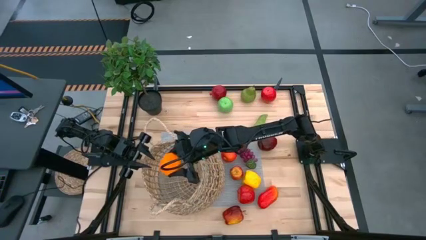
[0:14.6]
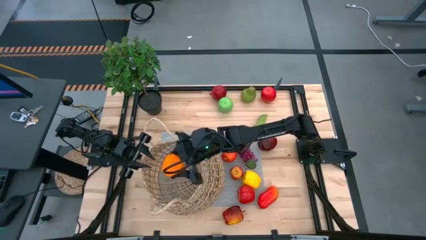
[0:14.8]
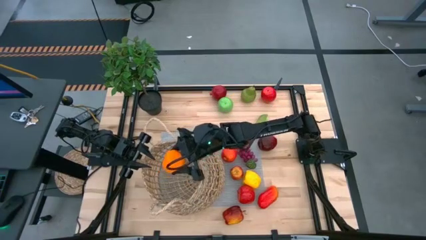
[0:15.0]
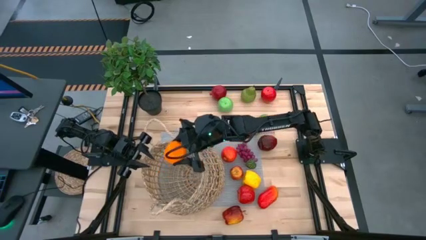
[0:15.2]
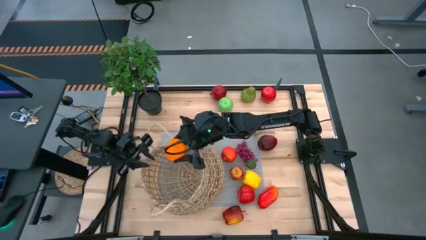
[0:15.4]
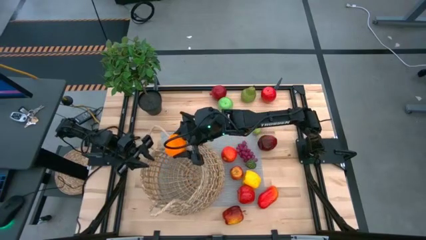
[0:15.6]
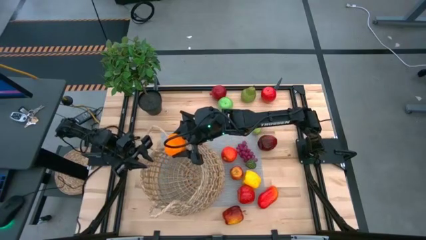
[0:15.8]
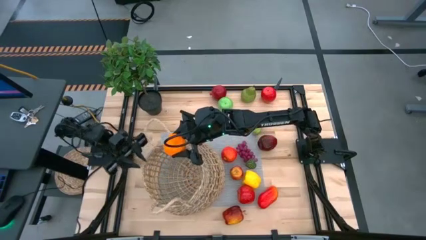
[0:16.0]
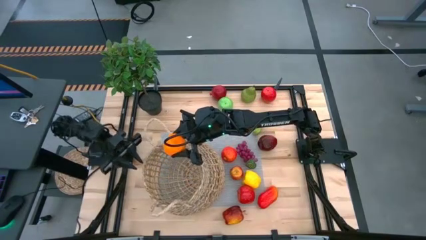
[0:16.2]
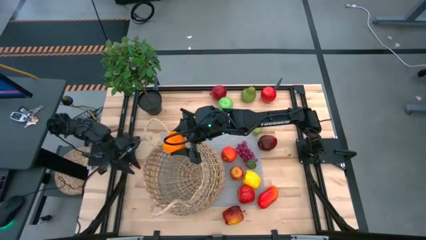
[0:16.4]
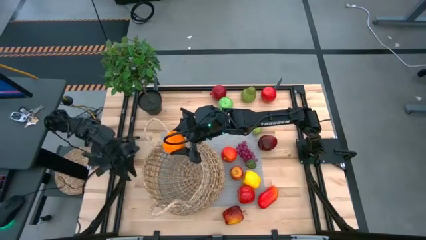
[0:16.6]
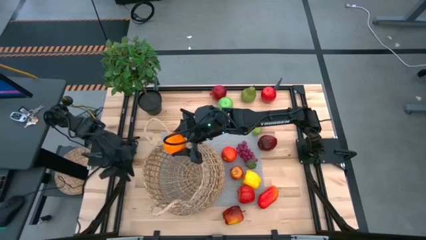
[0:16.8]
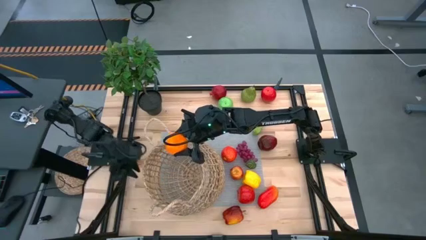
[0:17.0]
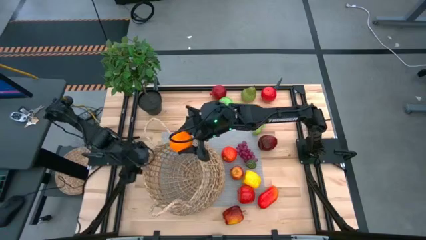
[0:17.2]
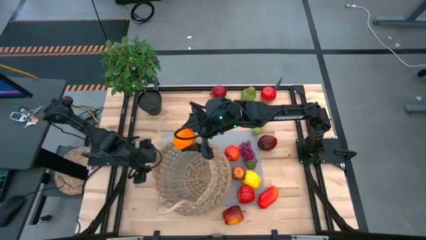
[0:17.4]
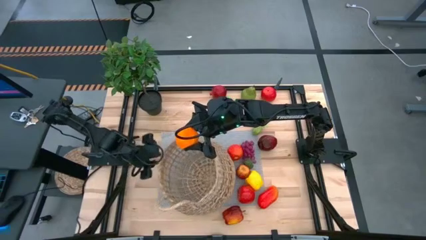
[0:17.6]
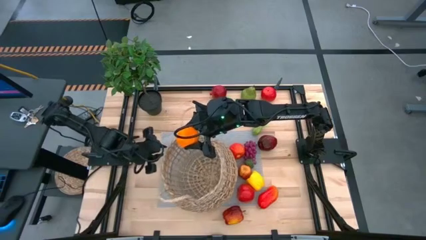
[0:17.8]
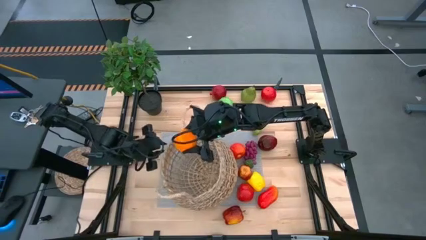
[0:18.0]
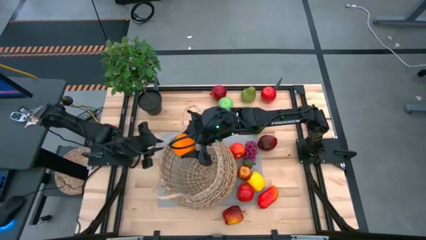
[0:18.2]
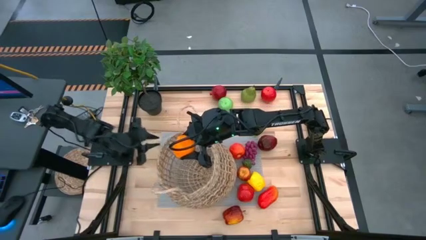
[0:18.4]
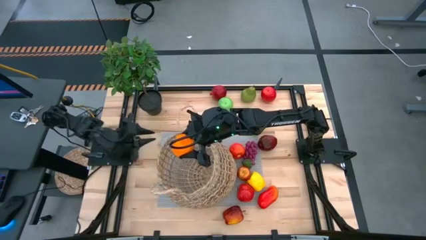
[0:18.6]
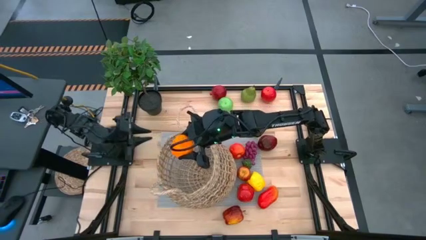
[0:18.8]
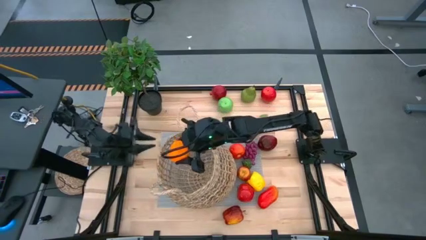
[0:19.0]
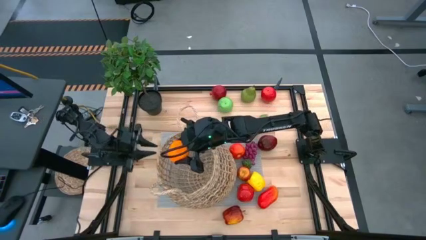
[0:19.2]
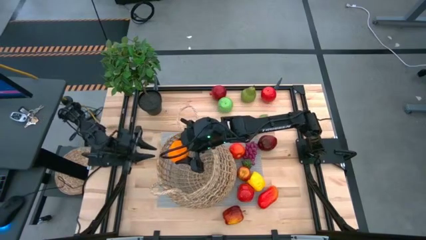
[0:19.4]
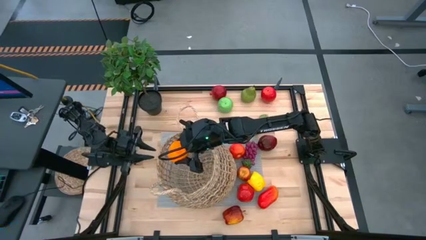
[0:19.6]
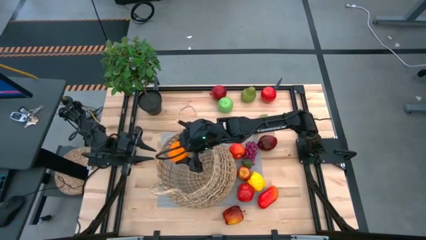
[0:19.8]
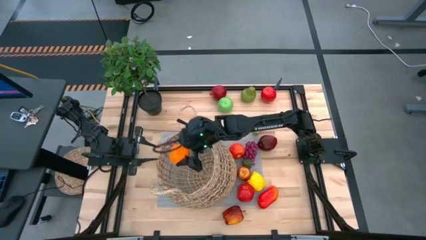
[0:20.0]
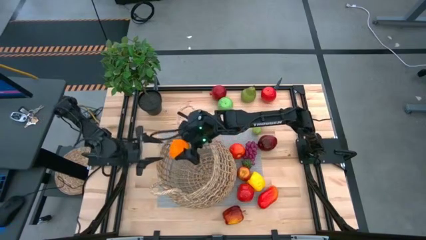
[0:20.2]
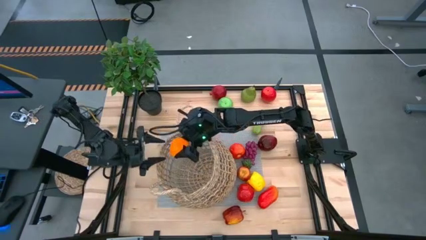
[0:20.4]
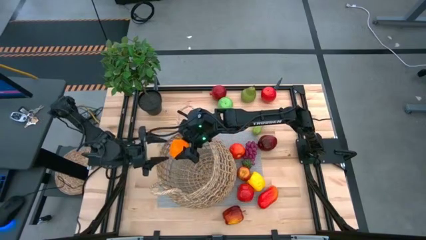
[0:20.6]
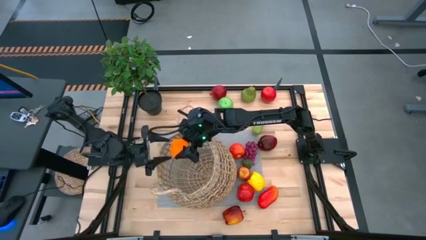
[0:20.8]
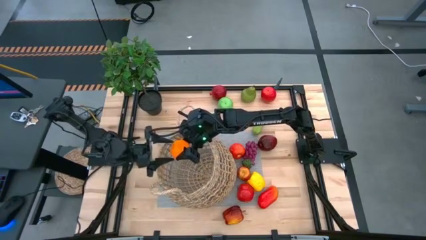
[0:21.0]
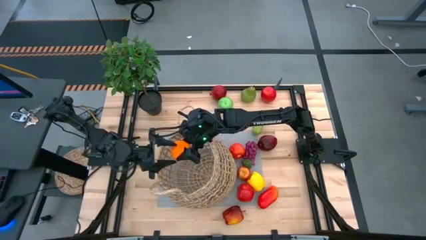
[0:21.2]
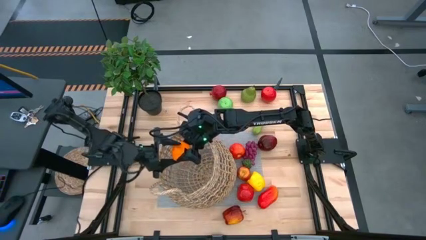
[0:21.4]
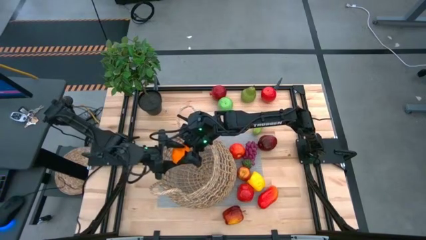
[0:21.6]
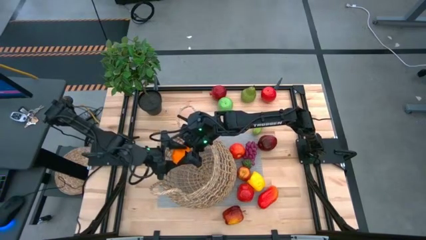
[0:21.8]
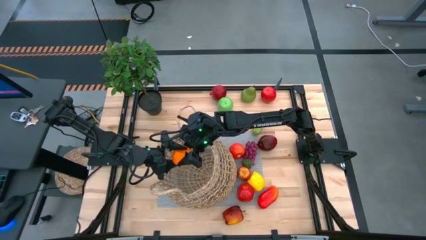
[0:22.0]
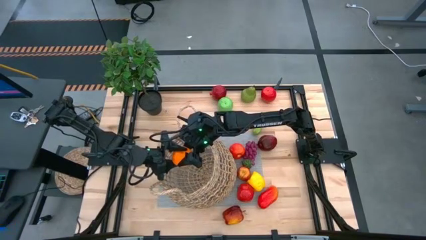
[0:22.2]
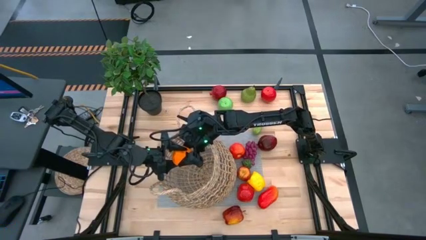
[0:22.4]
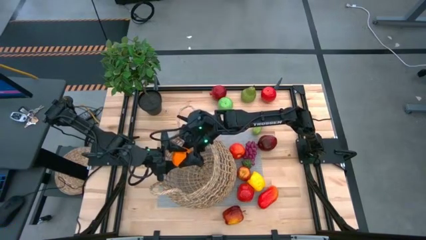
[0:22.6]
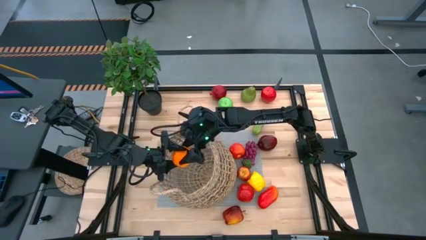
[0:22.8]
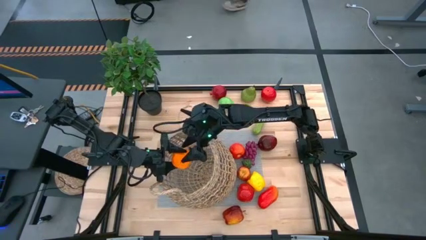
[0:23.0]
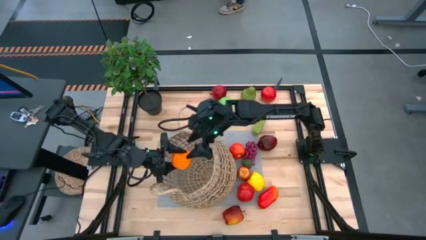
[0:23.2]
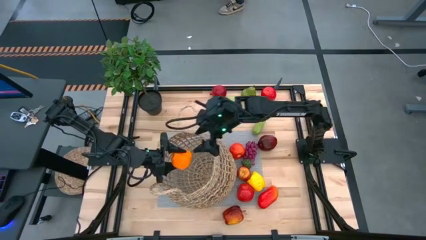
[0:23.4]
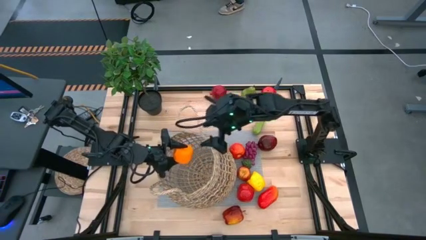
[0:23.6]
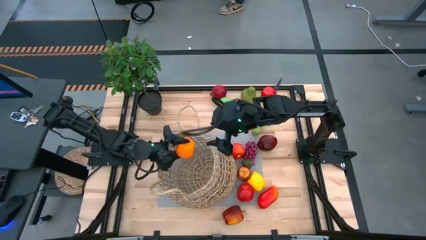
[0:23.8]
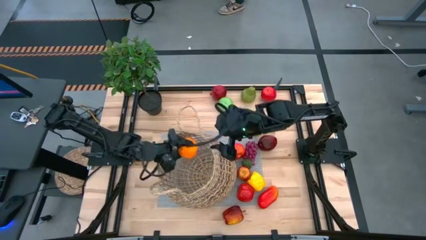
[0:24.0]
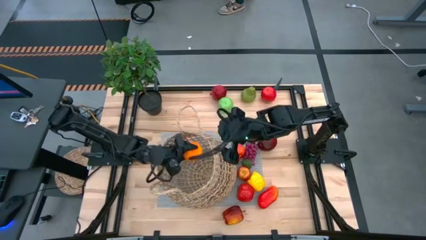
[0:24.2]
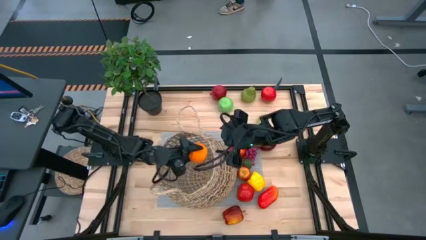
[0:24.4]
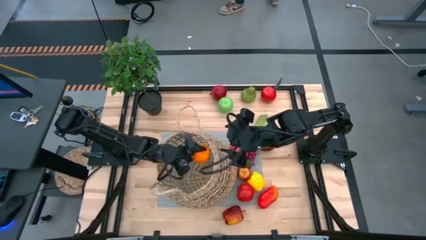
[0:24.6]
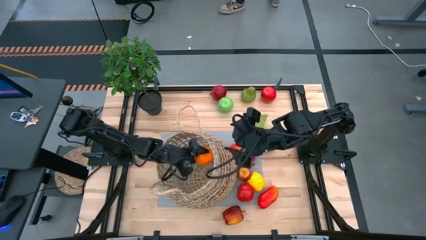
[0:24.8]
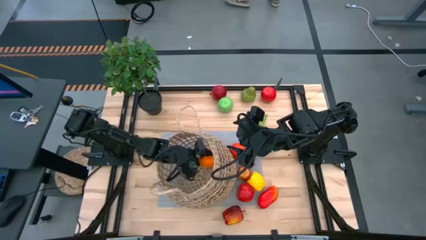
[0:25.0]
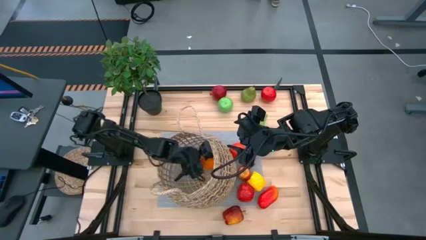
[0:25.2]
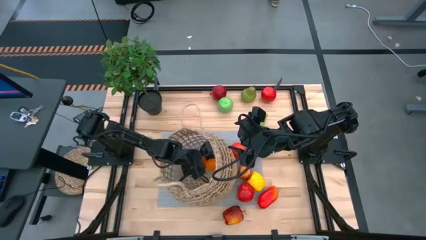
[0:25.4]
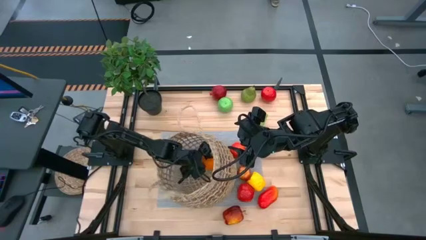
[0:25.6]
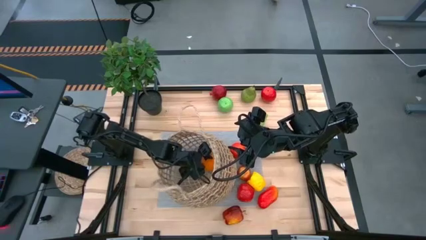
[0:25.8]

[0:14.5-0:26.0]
Task: Build produce basket
Put the orange into the brown basket

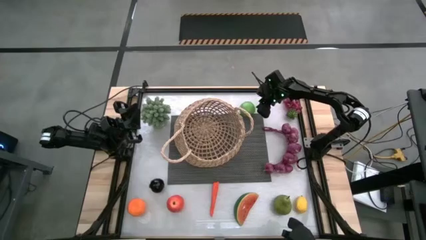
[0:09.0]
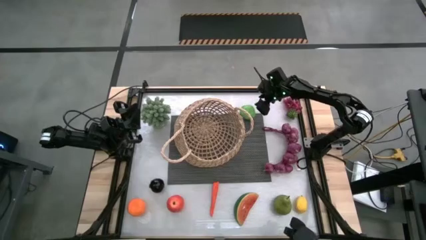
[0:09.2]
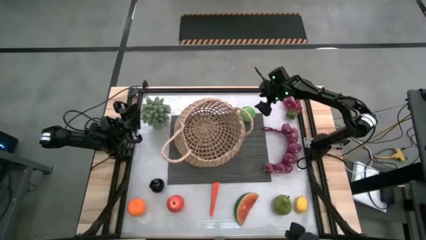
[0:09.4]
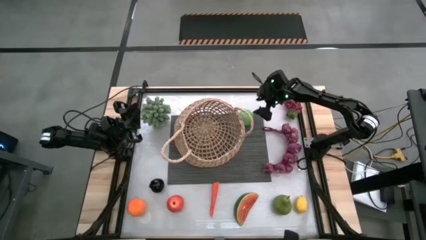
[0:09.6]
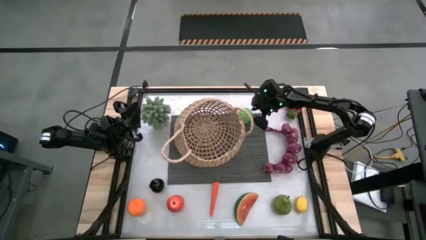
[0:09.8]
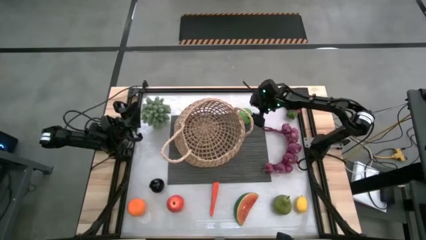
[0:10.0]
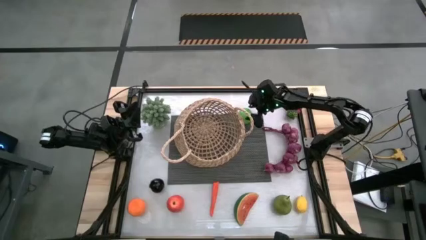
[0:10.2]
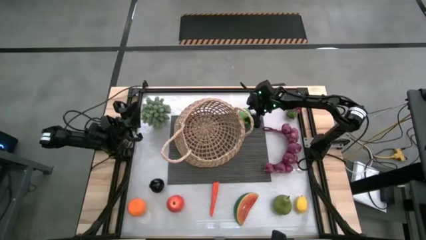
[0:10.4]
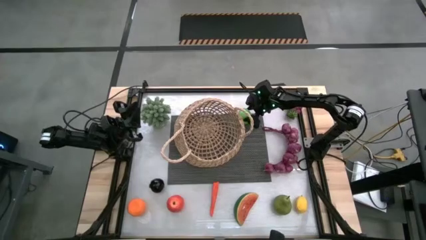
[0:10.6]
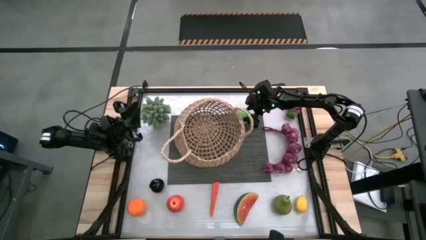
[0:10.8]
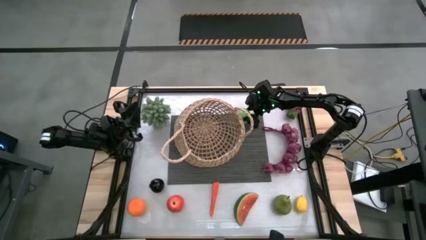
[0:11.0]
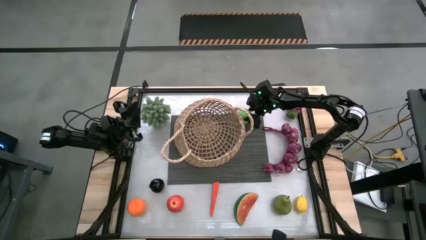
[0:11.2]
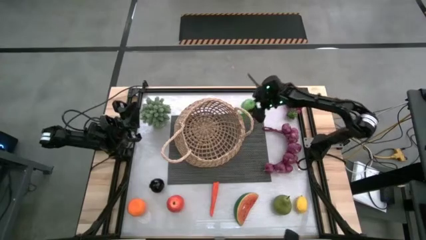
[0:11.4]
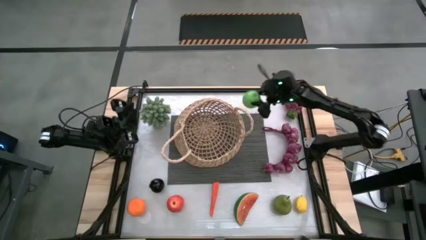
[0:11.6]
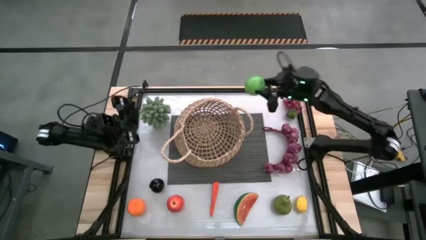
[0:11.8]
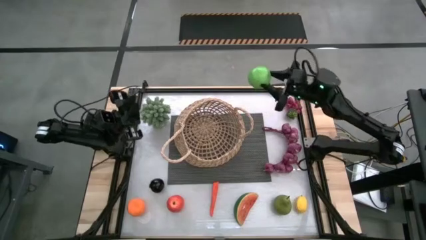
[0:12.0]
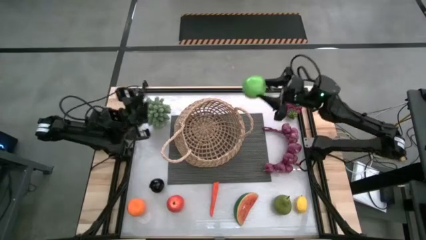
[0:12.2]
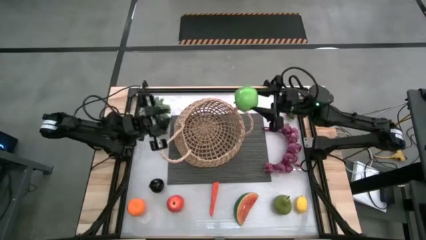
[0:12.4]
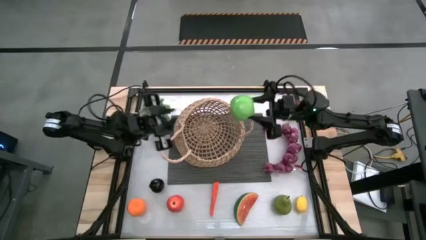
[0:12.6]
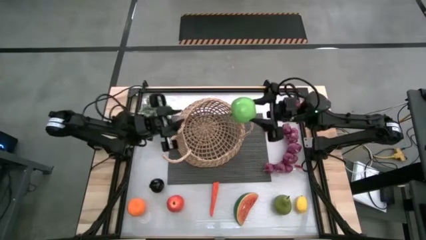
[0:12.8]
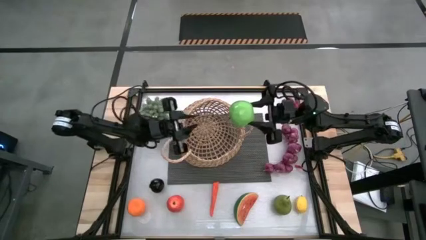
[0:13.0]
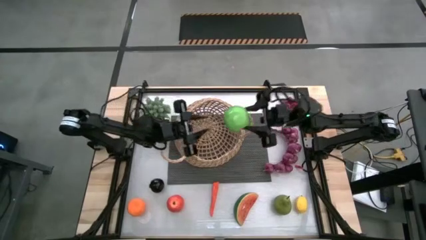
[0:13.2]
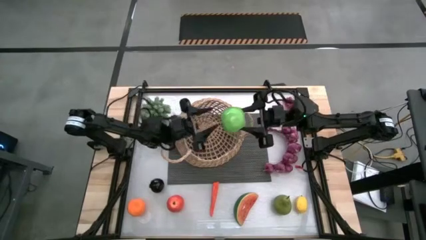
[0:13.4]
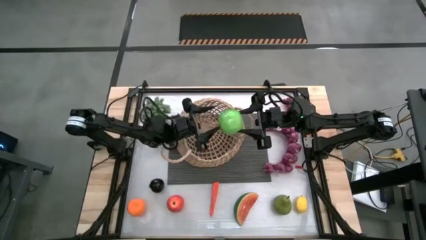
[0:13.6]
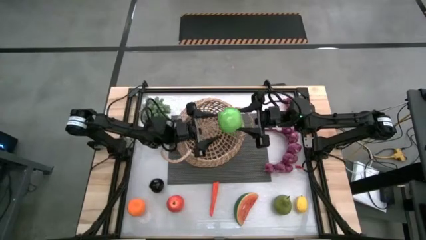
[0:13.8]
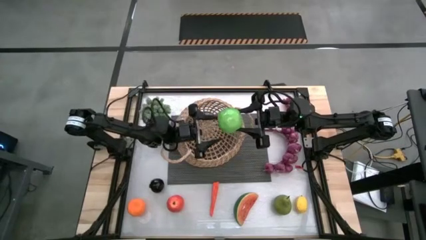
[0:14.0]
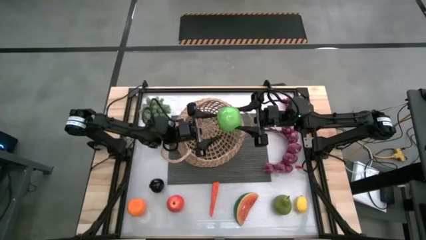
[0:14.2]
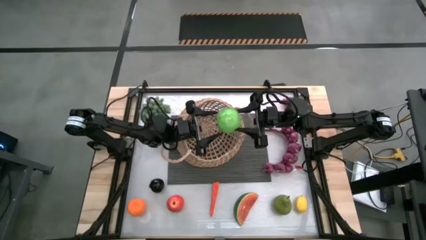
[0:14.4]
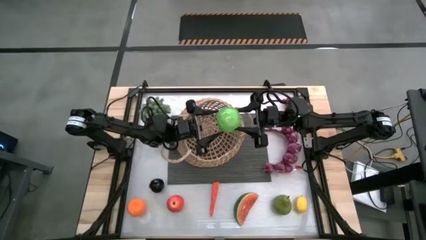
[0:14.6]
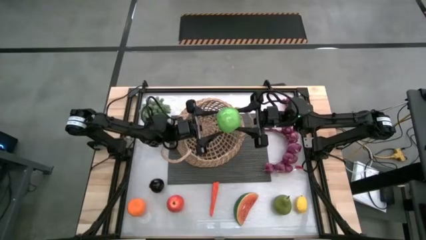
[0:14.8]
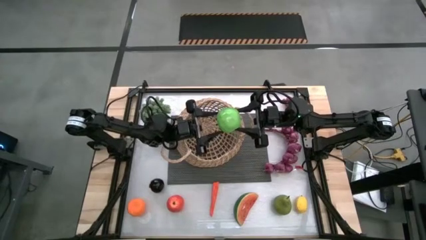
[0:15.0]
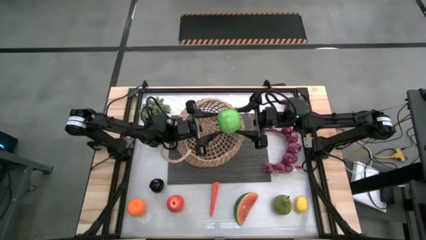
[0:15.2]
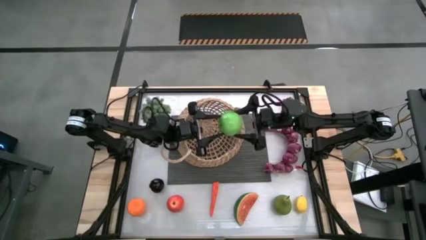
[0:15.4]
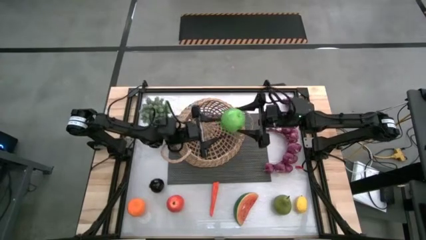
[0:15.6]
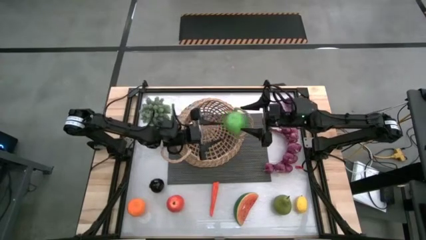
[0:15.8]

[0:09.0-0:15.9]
Task: Build produce basket
Put the green apple into the brown basket
